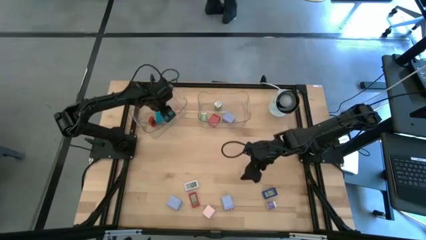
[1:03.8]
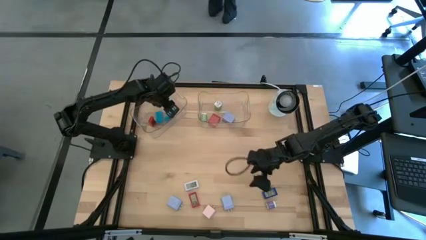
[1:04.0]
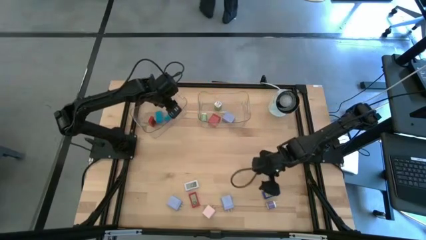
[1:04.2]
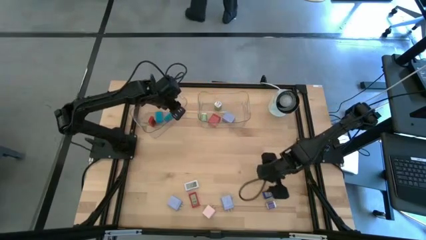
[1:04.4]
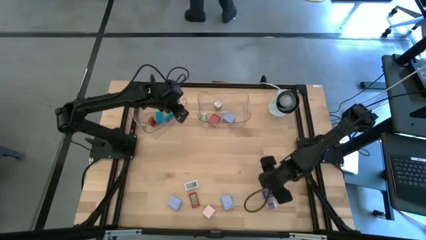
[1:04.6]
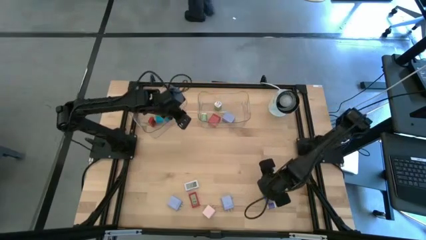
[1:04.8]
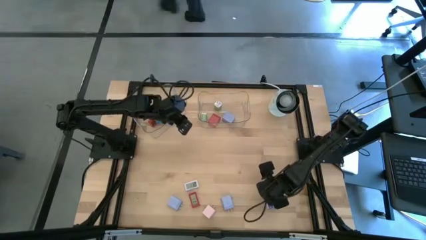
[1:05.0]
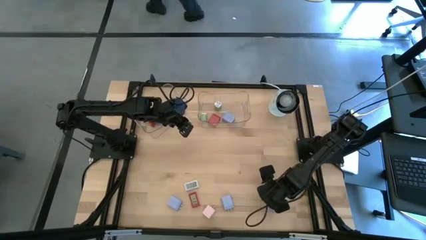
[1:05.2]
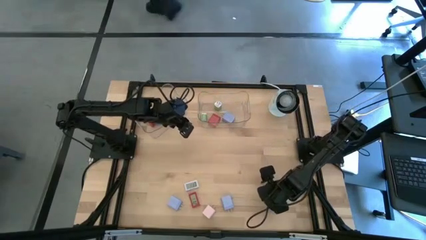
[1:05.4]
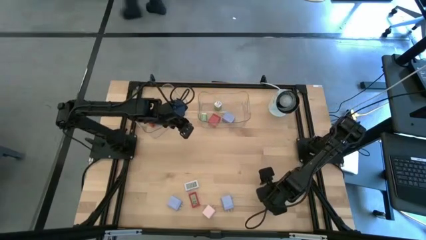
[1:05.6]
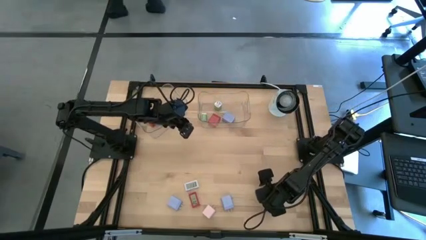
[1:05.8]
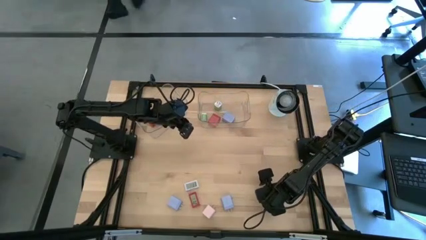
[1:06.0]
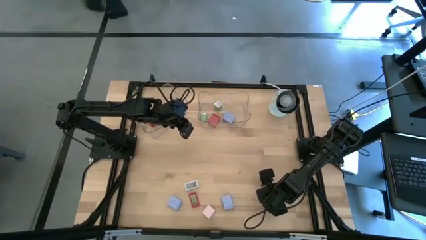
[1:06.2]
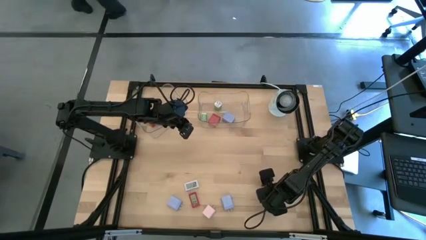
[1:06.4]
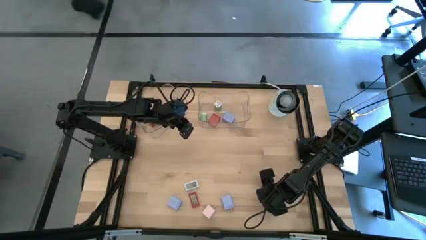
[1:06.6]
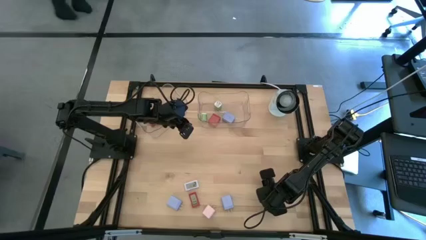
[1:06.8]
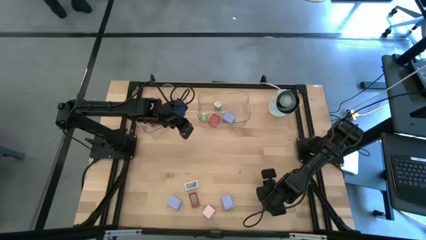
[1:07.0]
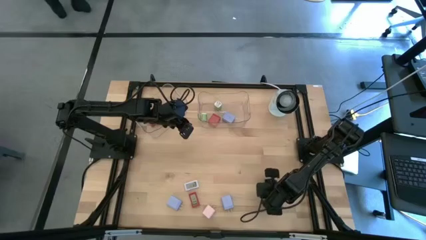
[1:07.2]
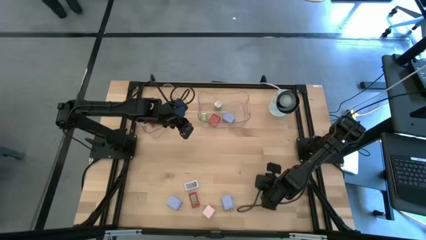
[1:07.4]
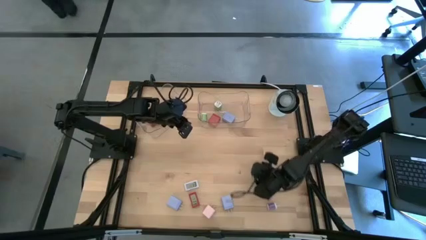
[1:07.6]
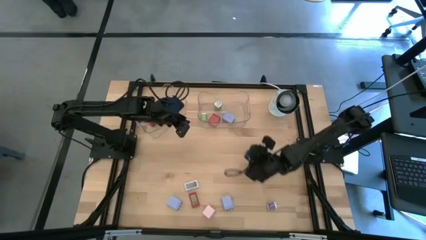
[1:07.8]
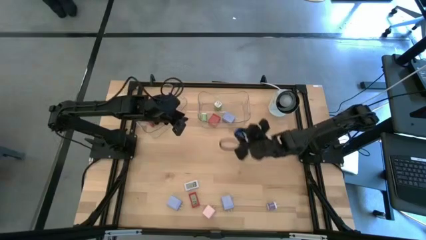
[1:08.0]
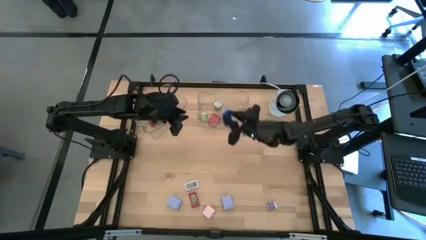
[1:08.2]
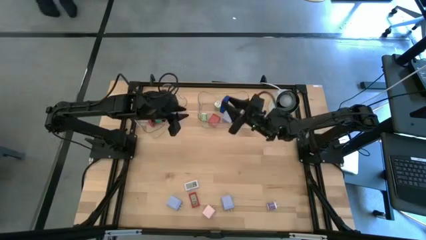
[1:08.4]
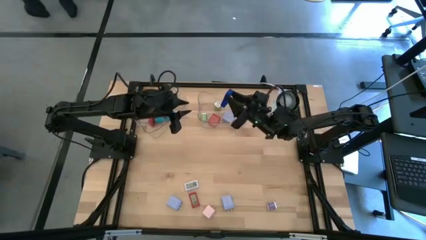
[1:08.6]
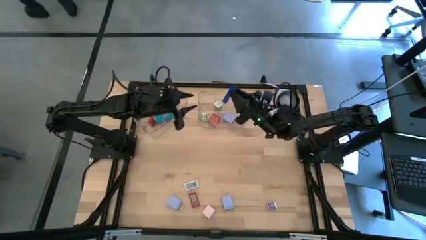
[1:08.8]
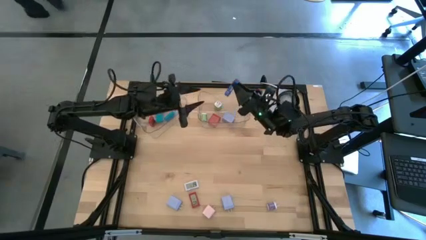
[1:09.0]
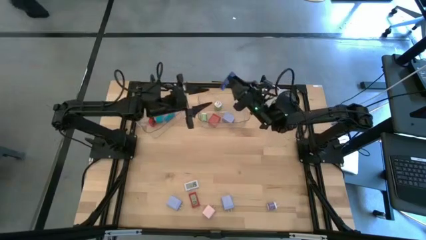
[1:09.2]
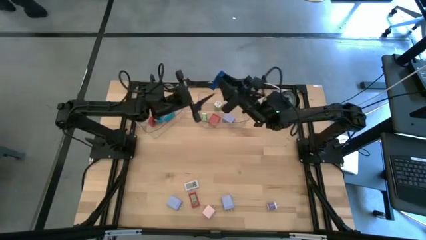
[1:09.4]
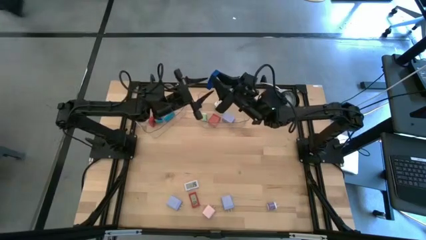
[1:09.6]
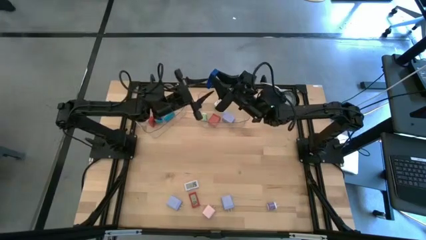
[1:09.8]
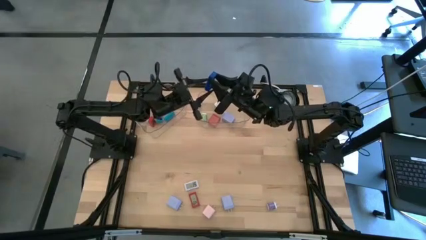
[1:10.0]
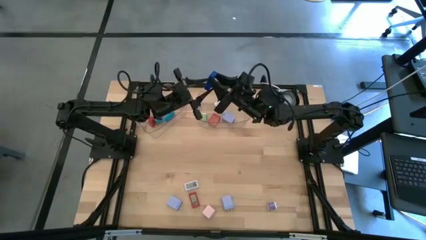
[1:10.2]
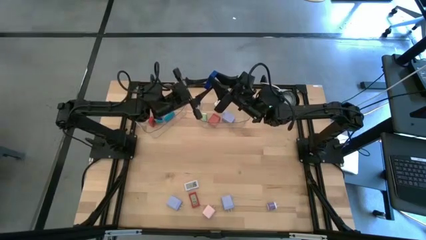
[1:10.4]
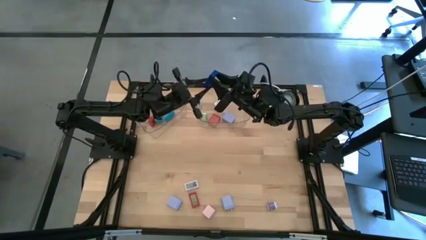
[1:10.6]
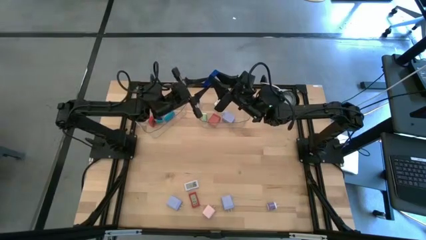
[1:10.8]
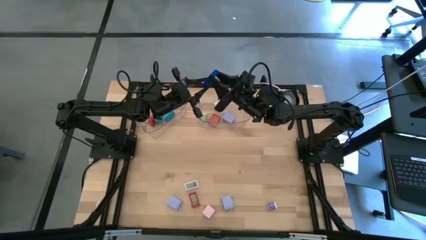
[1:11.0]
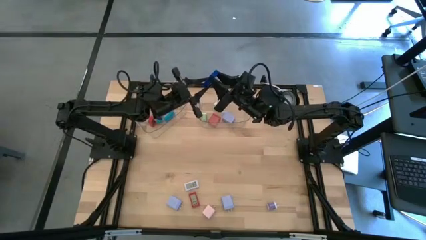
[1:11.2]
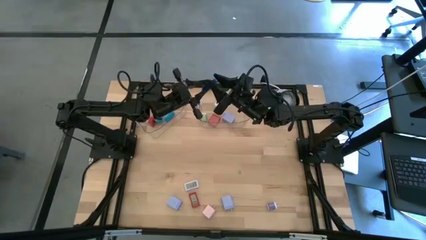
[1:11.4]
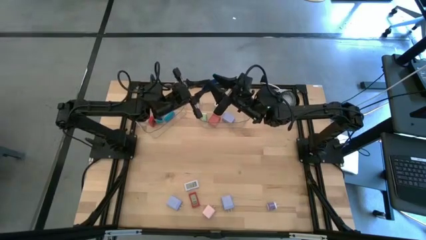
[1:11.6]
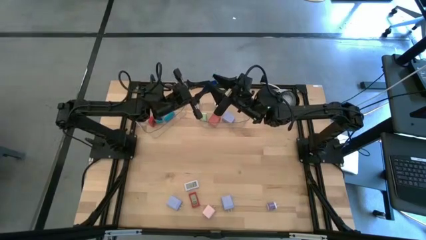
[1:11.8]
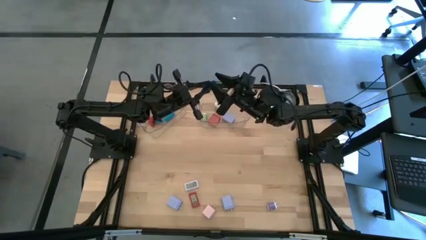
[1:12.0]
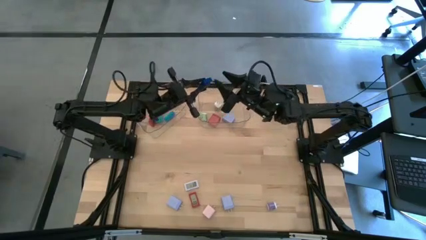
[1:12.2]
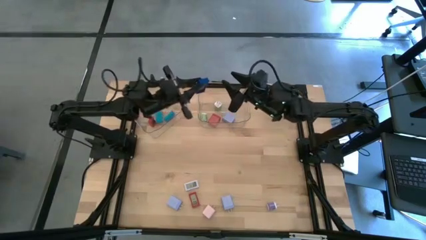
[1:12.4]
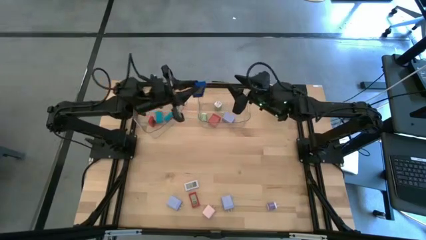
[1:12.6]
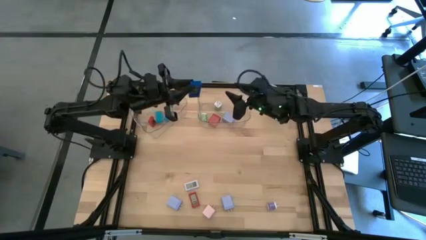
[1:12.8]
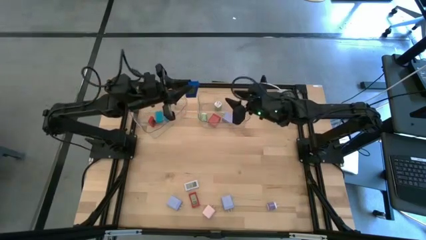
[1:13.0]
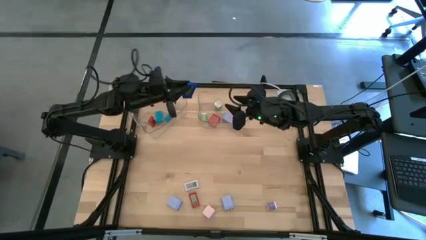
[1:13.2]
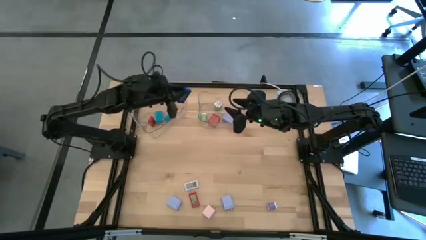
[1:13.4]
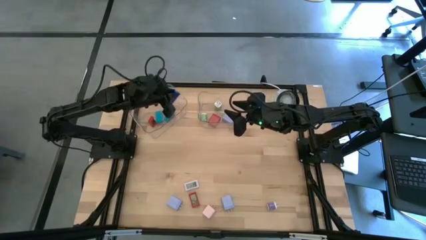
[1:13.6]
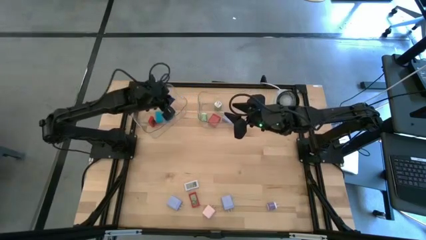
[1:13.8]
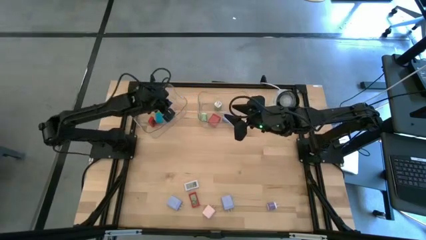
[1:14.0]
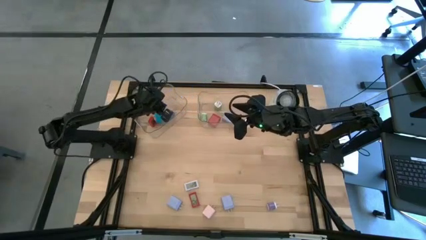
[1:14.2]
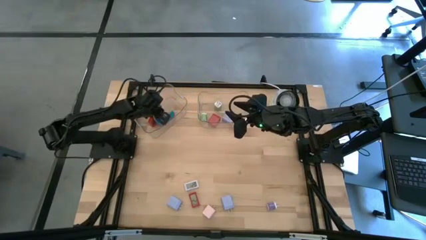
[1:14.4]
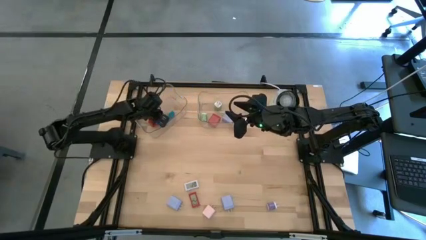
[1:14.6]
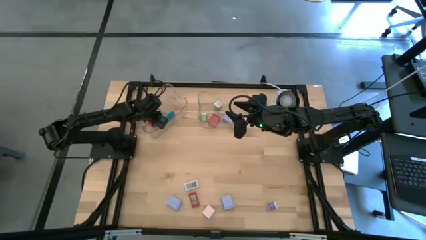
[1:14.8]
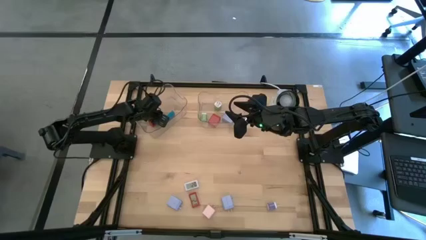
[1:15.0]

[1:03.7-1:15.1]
Task: Pick & Place Office items
Put the dark blue digital timer into the left transparent bin

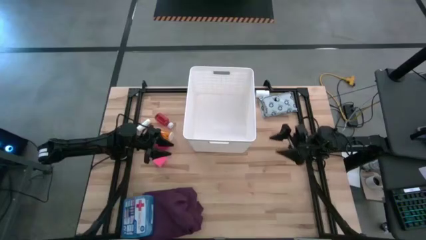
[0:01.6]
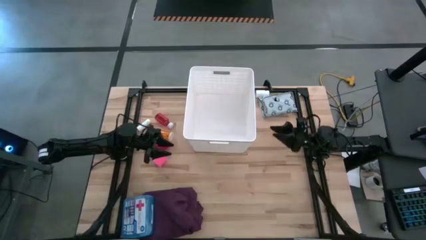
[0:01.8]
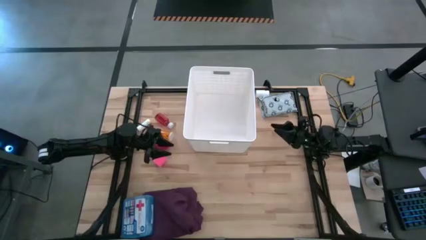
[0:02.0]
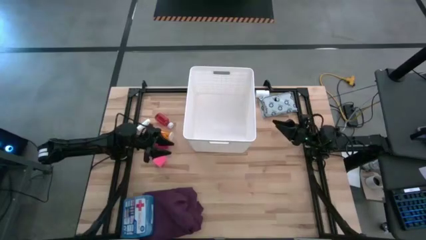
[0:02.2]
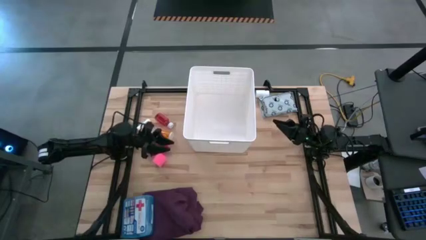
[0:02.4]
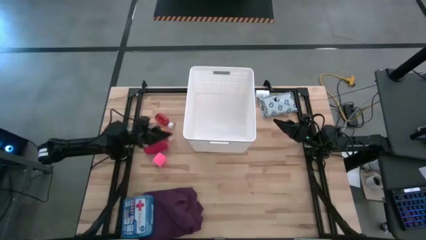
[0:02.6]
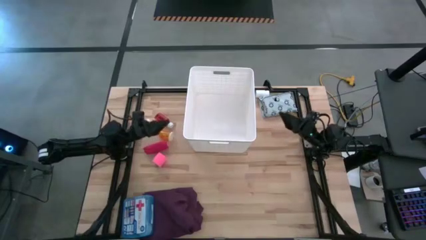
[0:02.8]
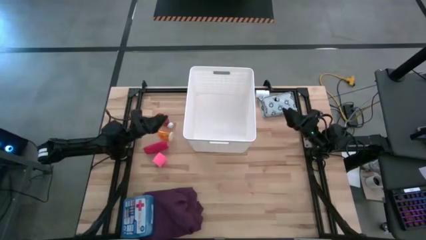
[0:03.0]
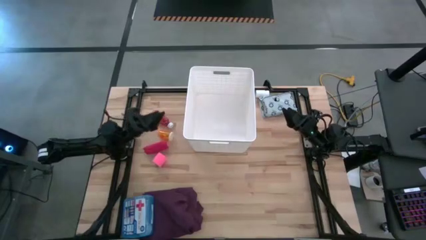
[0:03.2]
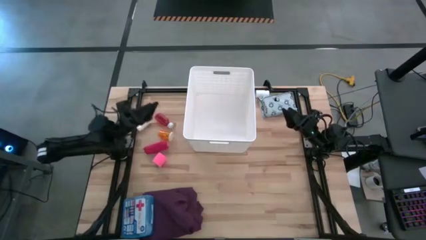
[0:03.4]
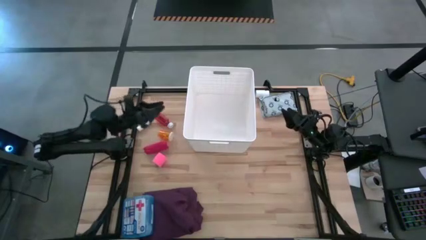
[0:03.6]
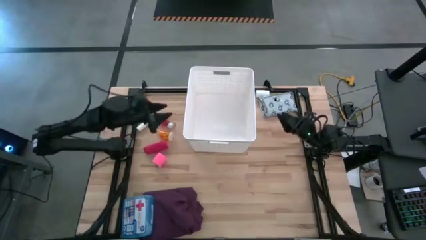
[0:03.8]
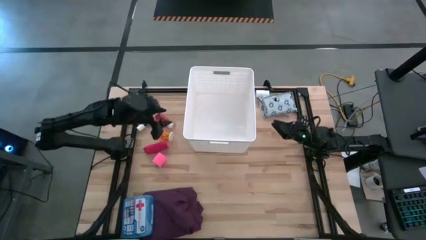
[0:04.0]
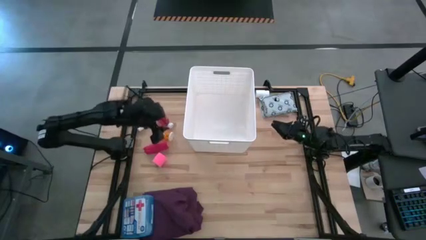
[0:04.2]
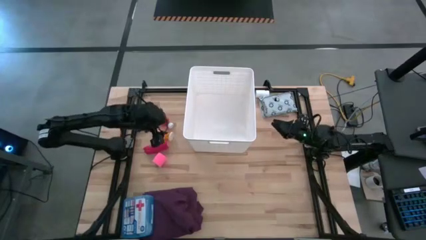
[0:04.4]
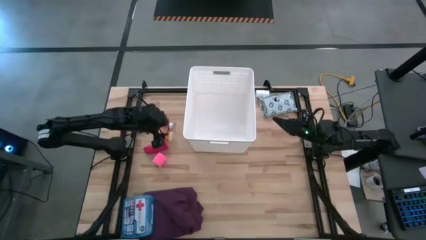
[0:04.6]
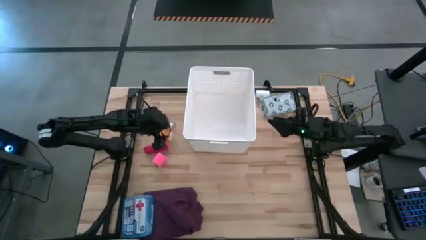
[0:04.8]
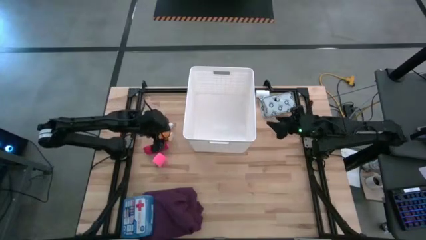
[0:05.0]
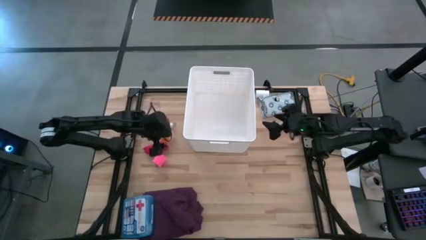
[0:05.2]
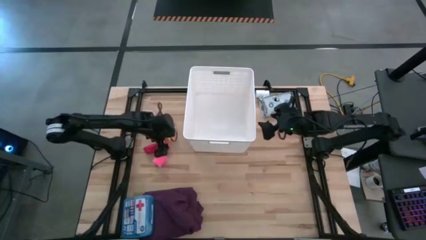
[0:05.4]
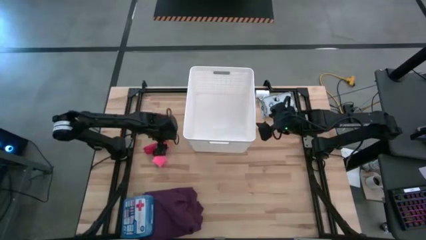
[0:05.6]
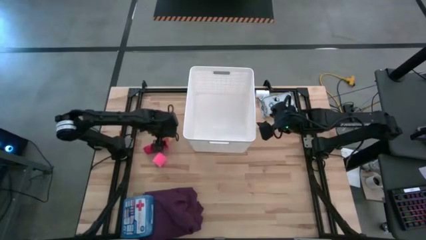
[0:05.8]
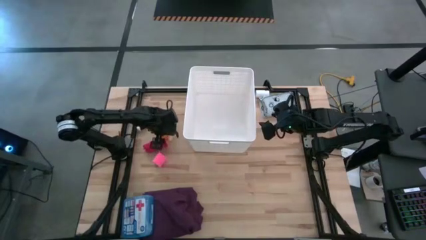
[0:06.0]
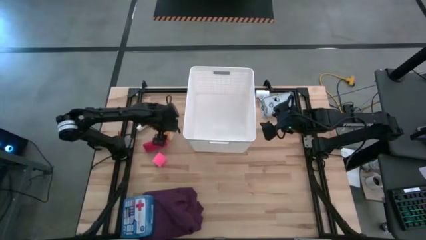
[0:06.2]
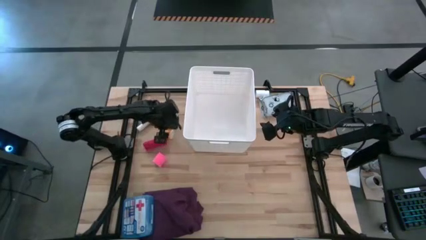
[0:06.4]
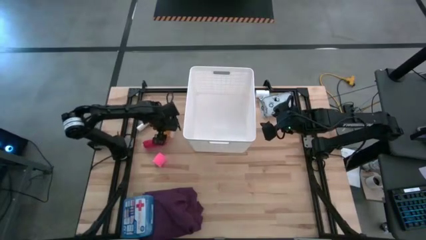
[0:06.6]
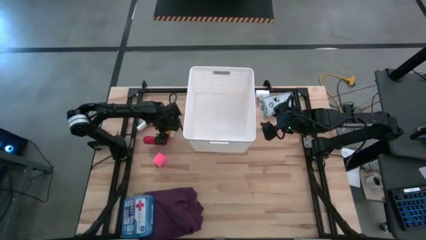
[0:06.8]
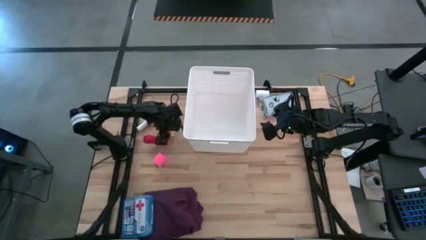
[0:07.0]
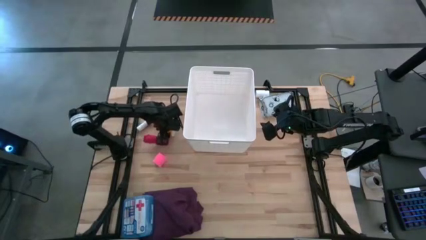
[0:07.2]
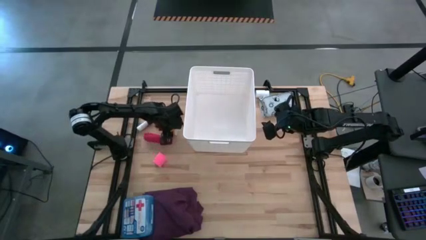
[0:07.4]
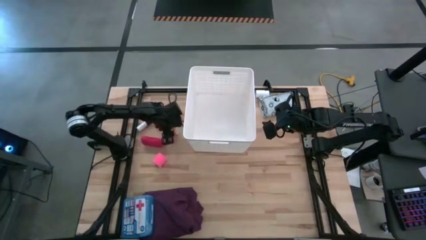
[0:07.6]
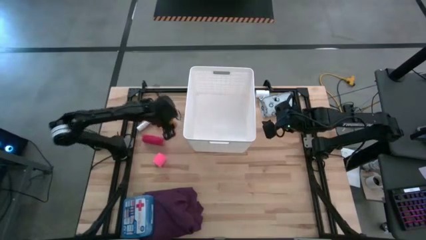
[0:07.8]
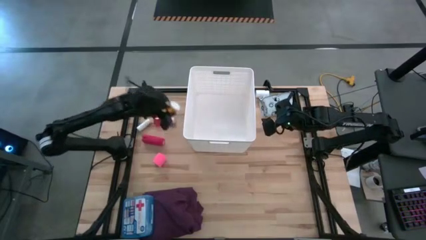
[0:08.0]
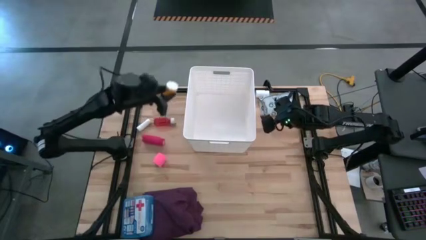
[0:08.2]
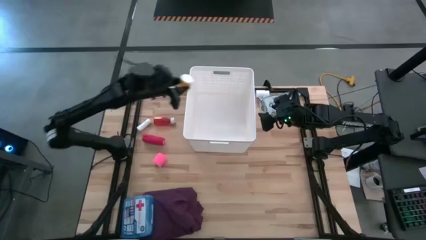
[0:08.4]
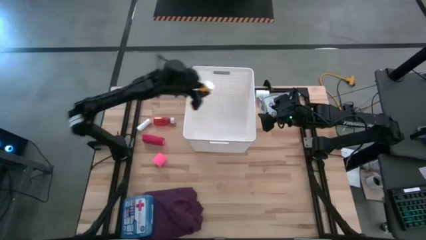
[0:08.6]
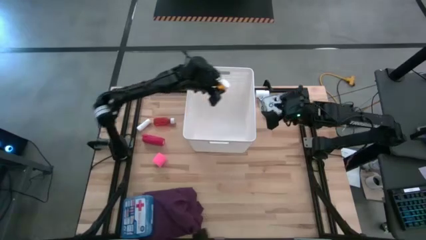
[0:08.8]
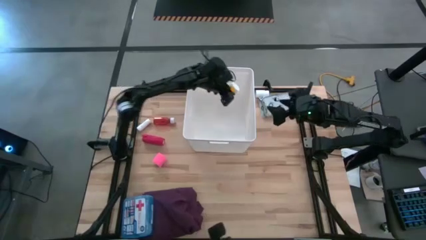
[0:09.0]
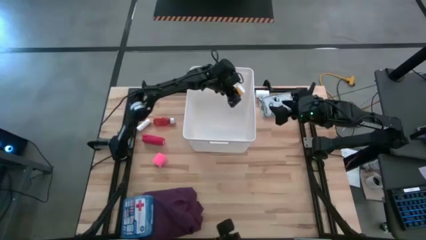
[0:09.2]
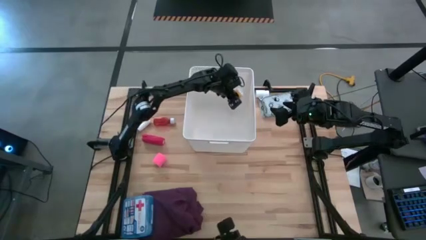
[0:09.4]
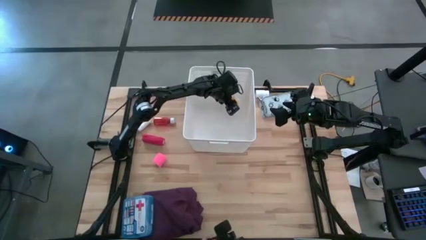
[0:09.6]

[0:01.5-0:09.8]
Task: Pick & place medical supplies in basket/bin
Put the yellow pill bottle into the white bin
